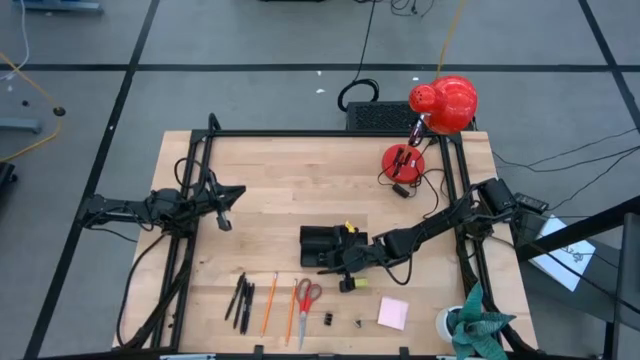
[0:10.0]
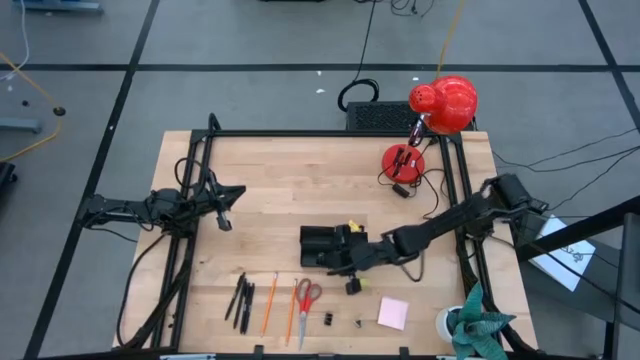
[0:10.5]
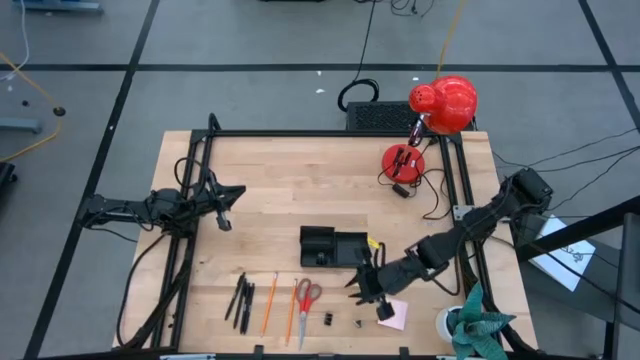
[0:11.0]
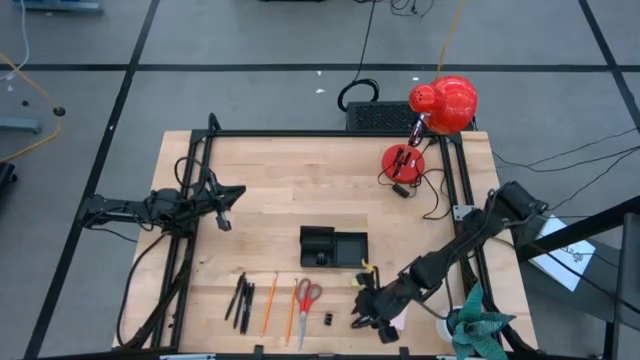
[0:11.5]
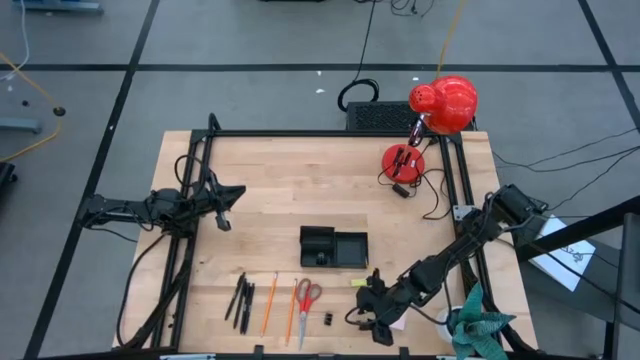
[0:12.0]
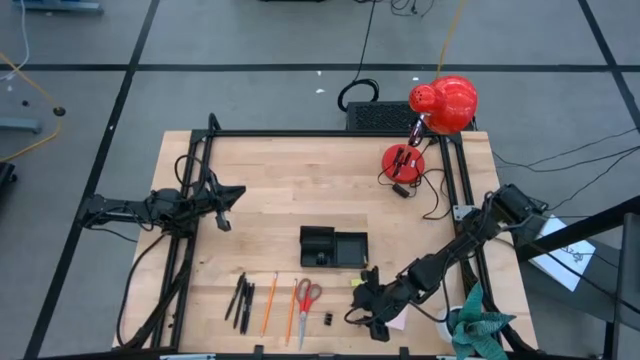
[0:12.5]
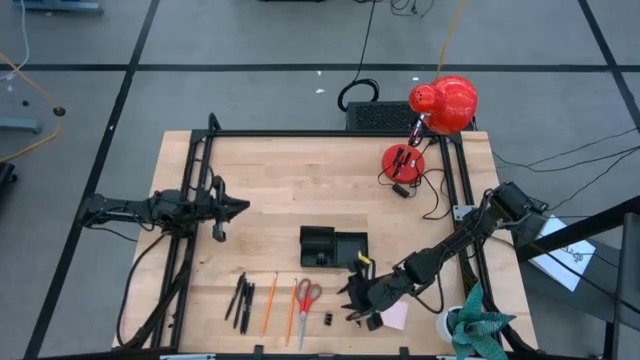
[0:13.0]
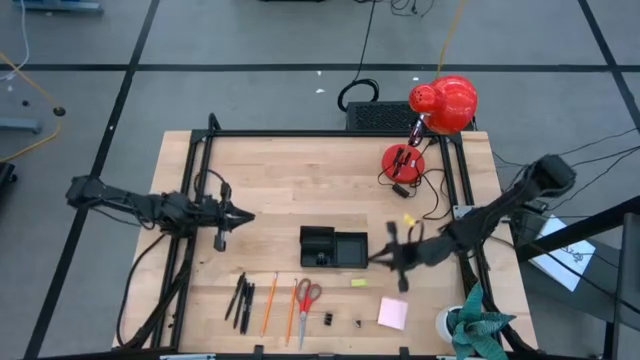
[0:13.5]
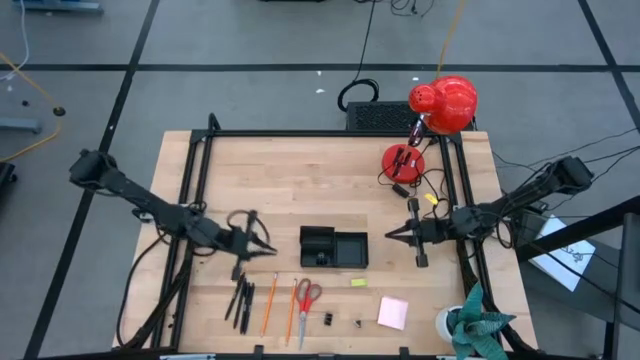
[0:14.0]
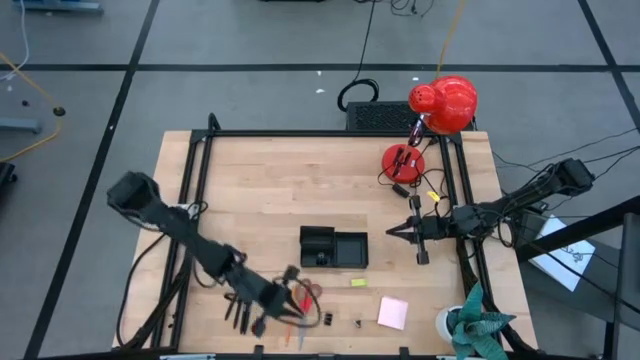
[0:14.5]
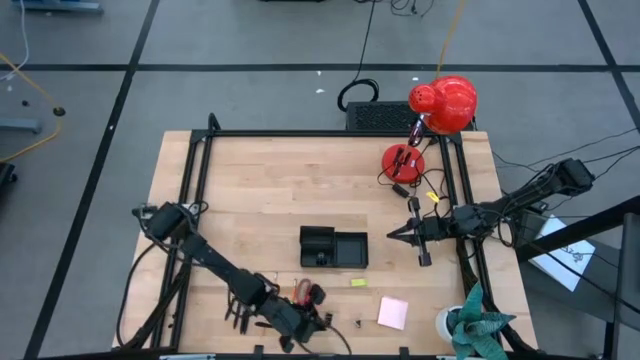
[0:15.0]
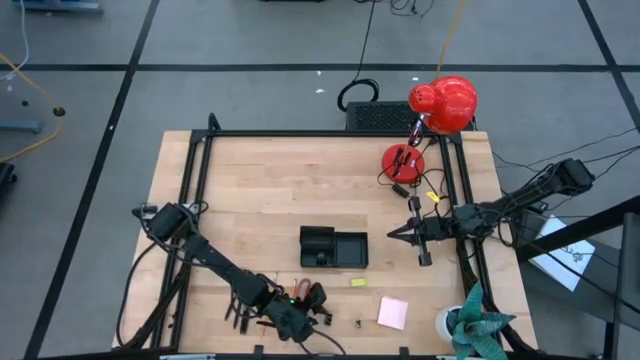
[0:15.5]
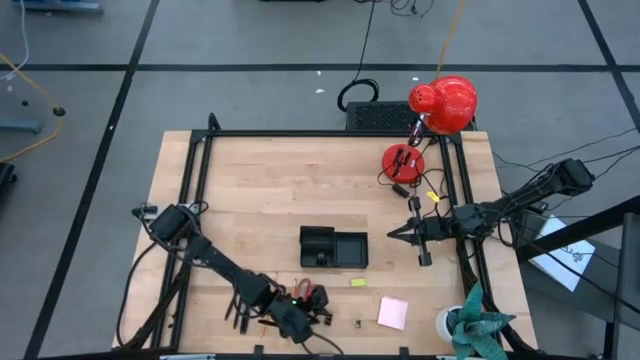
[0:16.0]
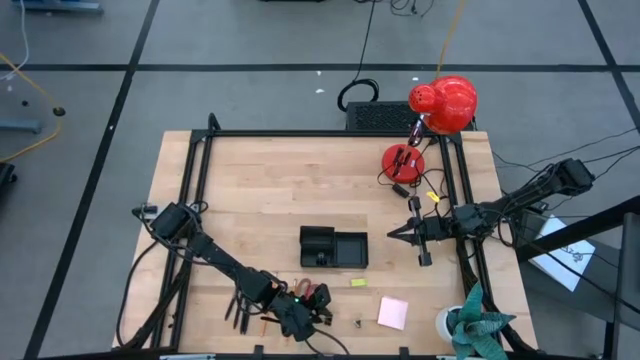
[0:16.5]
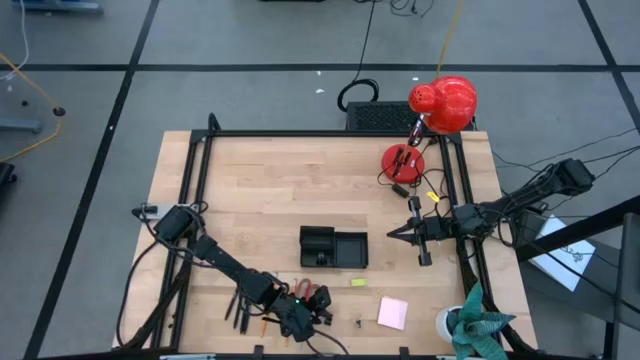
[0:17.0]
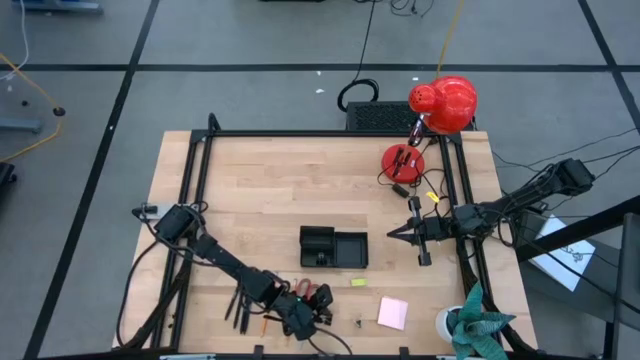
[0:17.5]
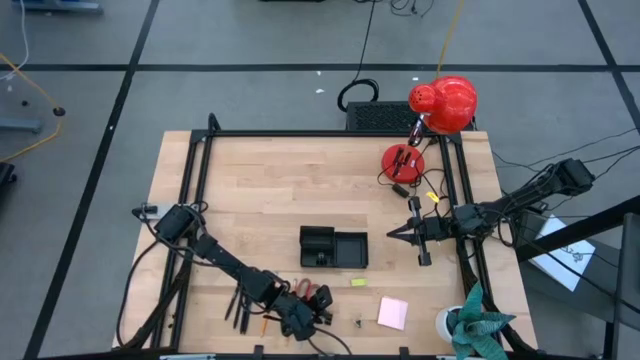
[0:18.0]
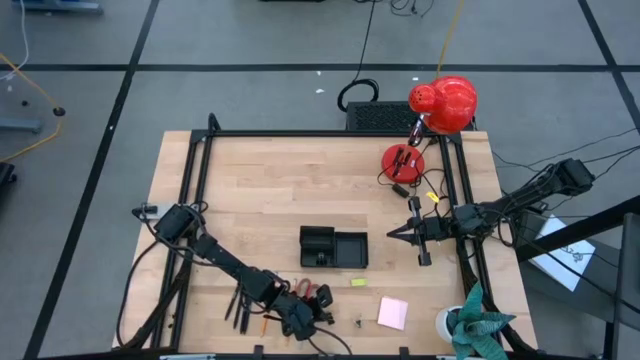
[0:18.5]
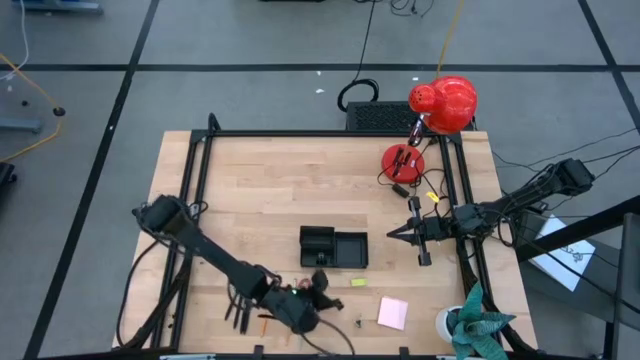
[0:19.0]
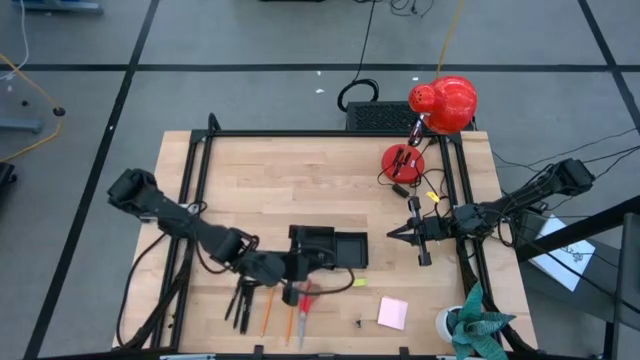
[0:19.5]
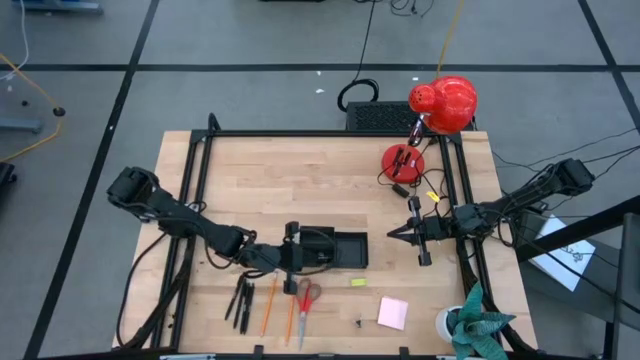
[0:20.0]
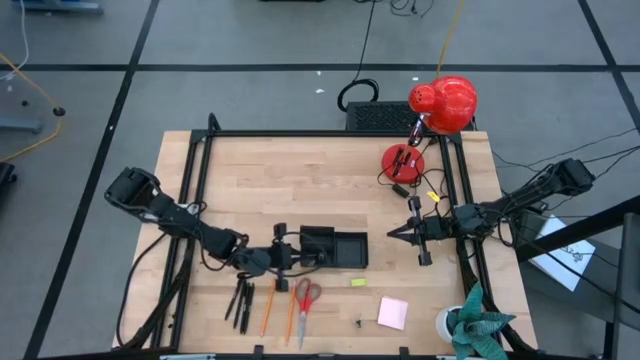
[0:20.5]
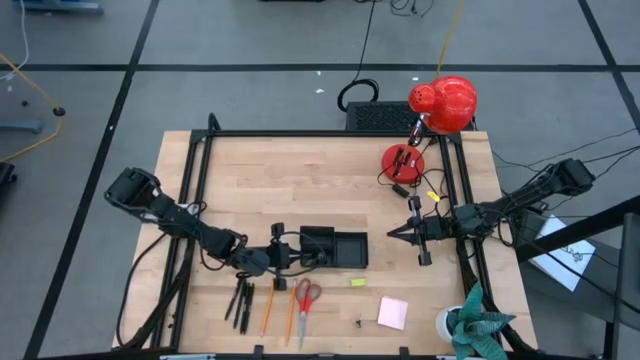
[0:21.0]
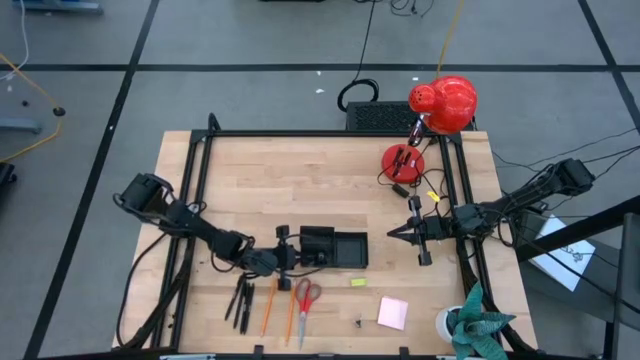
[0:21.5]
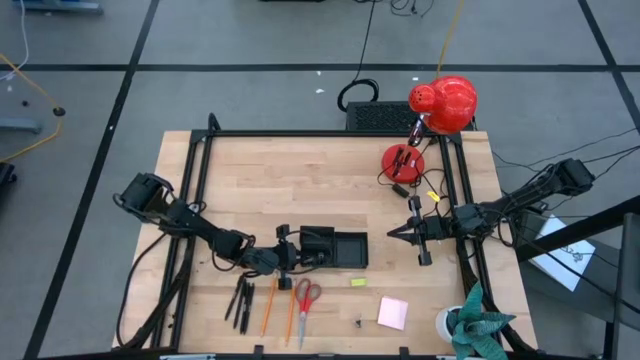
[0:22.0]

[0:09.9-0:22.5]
Task: Pick and place office supplies into organizer
Put the black binder clip into the black desk organizer

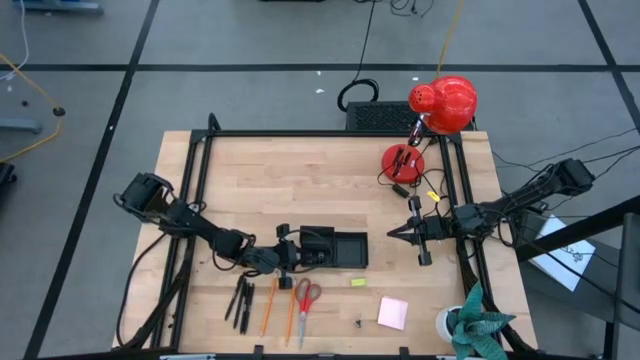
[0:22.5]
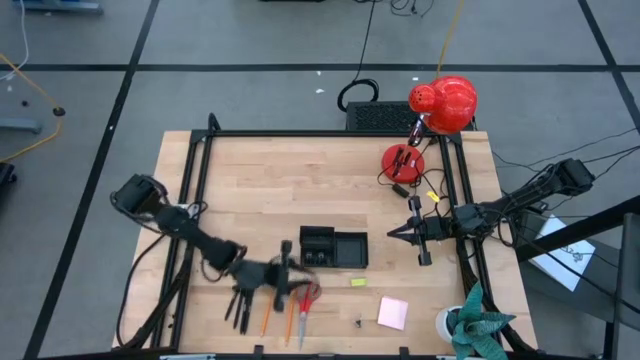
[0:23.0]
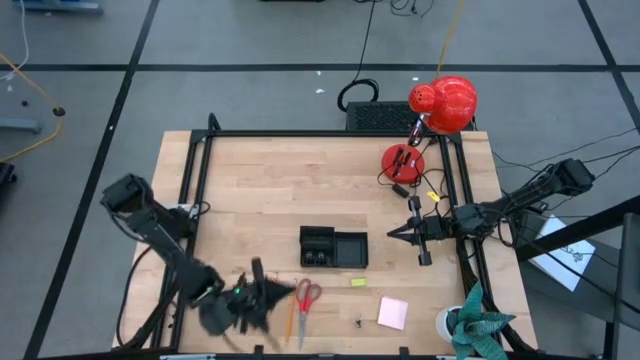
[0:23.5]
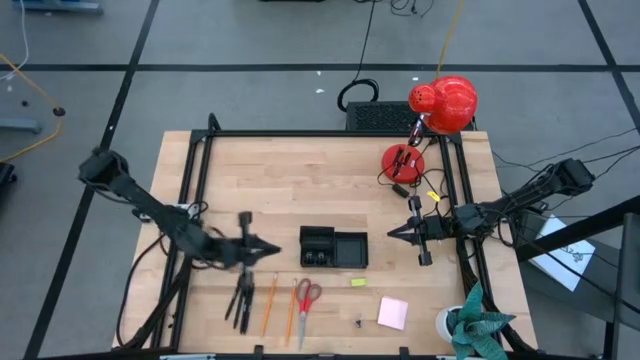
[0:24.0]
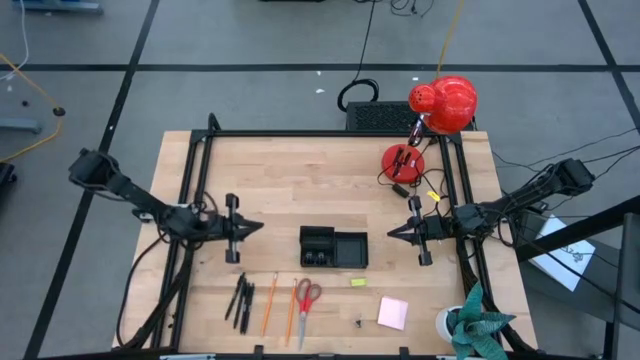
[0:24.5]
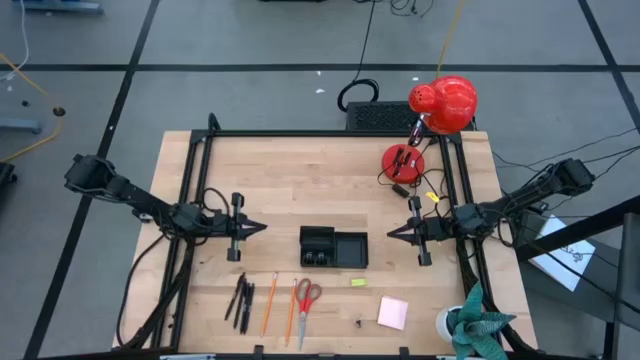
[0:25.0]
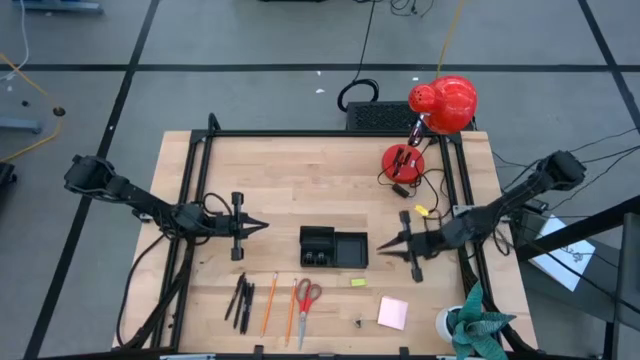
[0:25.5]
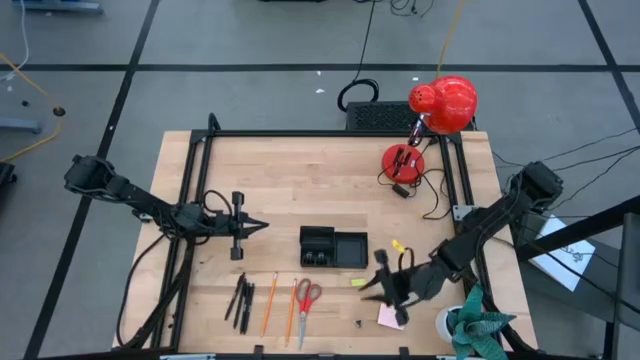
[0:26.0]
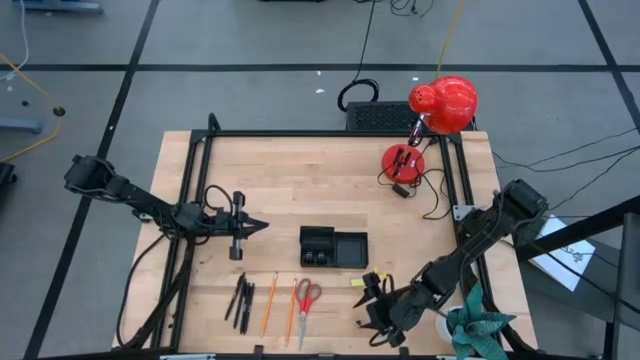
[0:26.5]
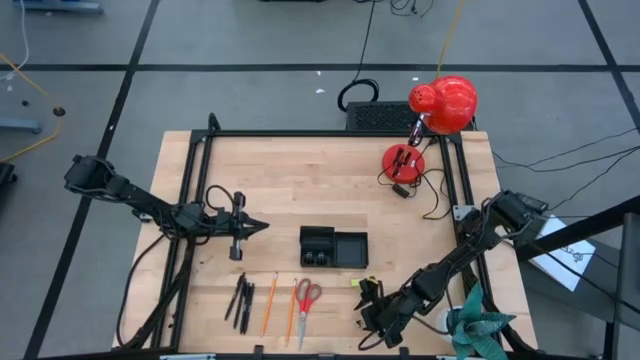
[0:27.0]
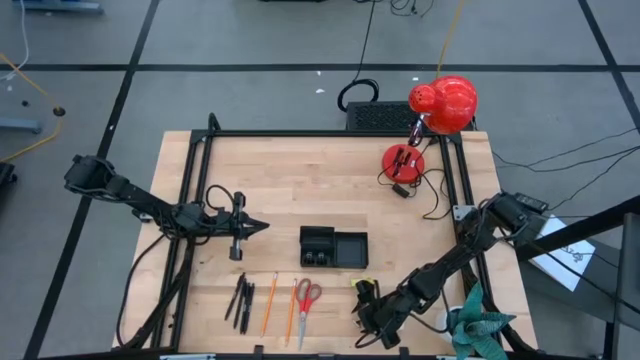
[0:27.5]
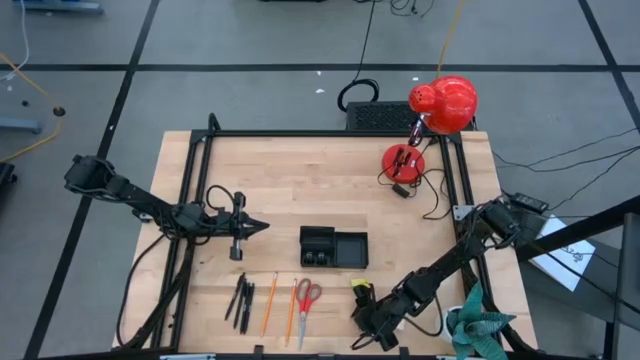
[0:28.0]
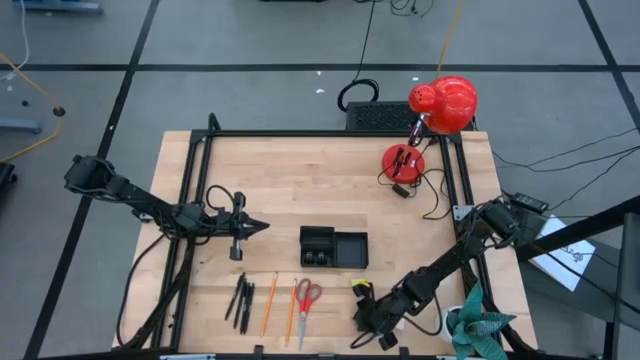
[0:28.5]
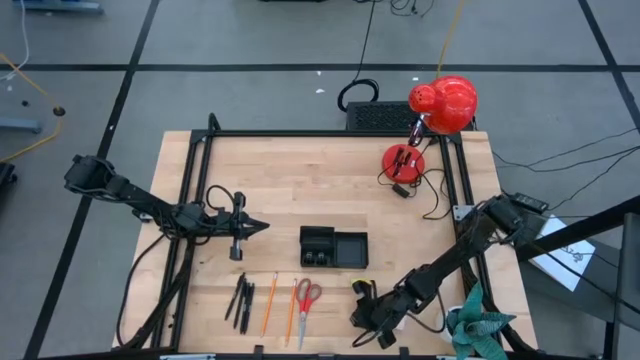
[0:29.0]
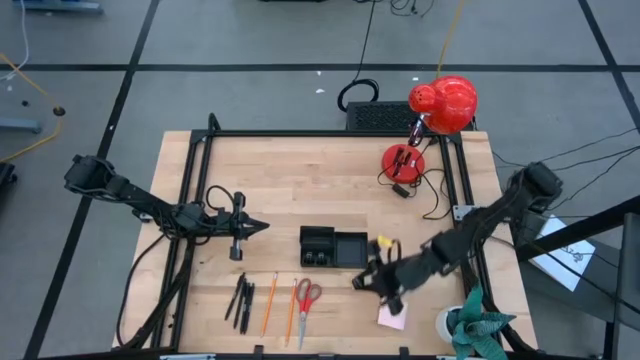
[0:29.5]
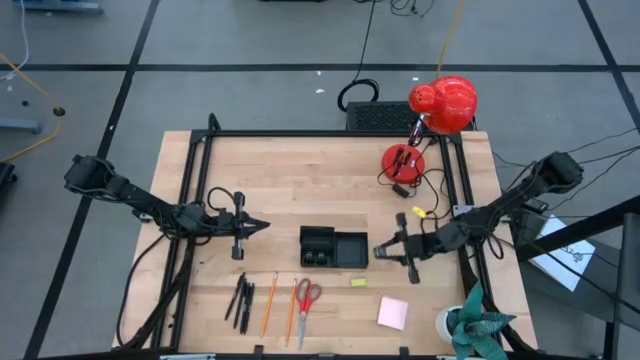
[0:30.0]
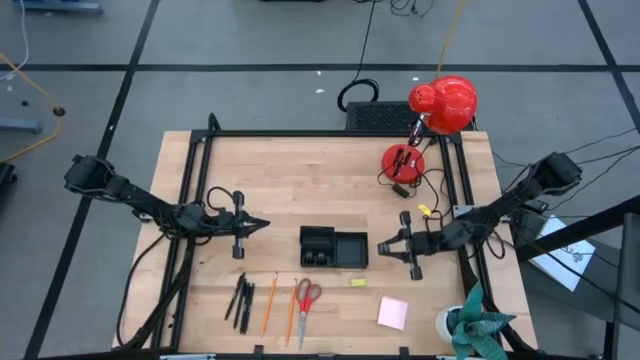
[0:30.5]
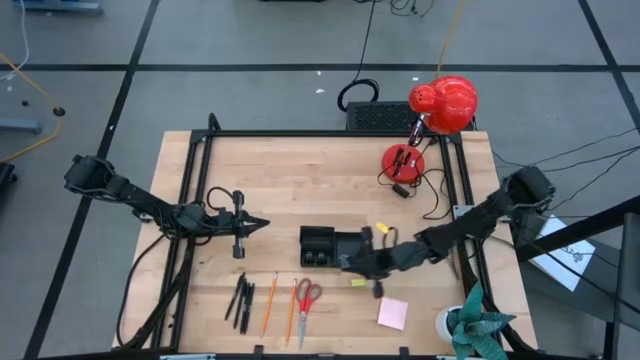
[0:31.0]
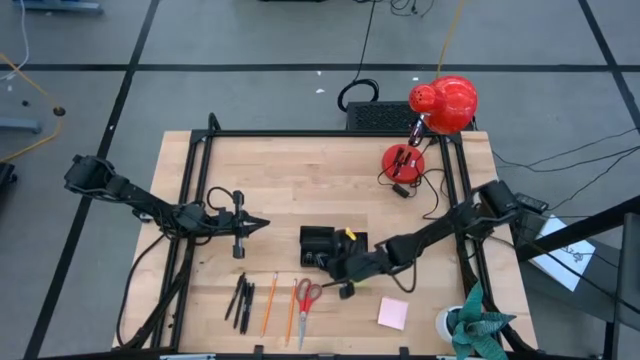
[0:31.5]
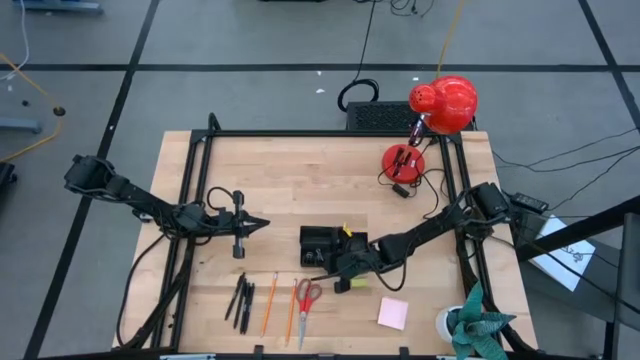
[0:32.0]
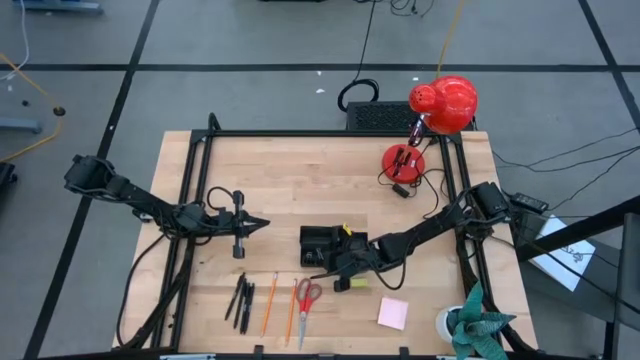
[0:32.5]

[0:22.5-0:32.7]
Put the black binder clip into the black desk organizer
